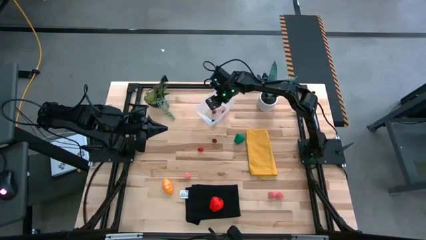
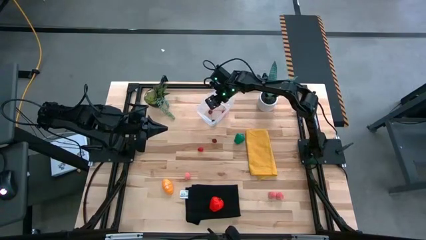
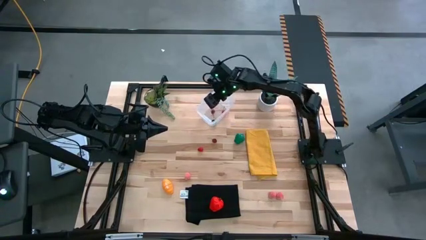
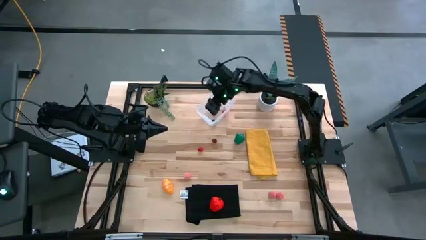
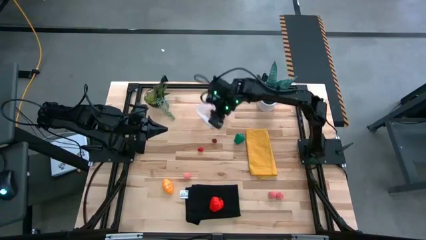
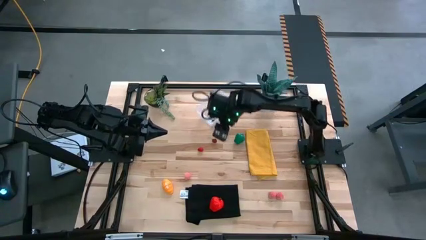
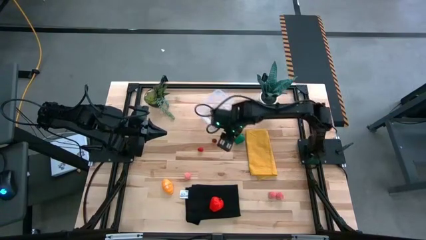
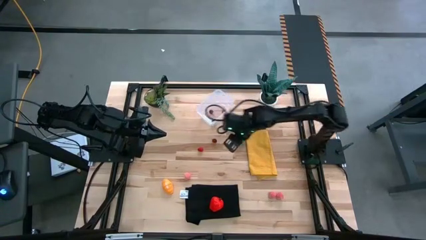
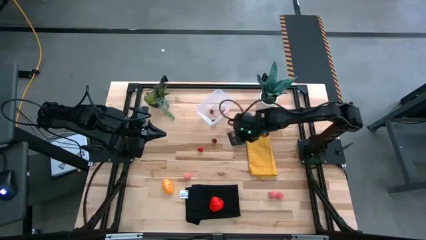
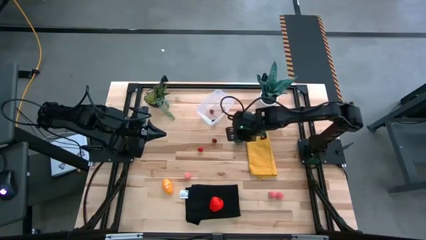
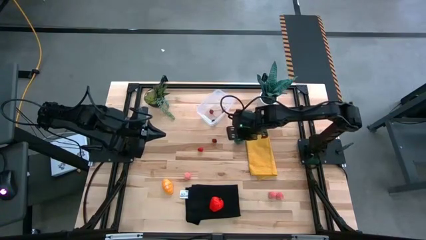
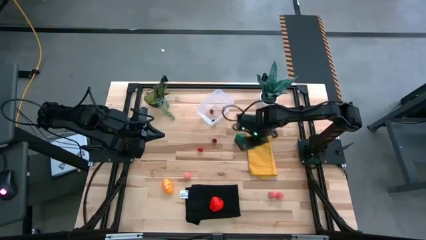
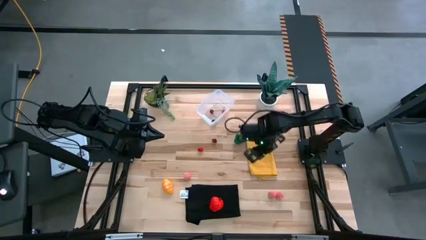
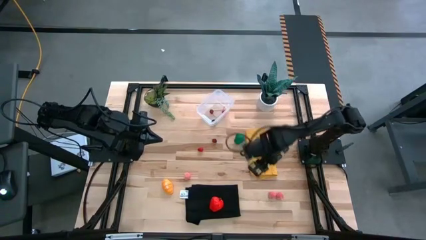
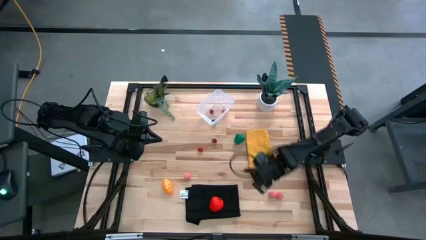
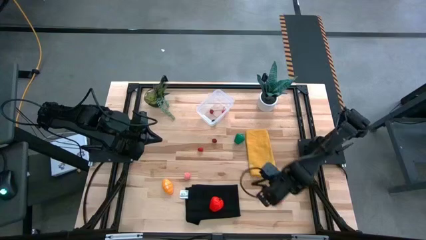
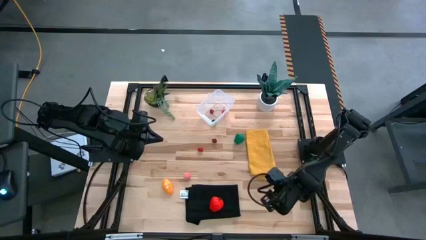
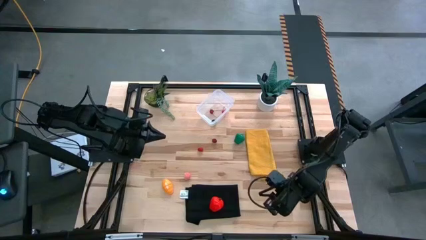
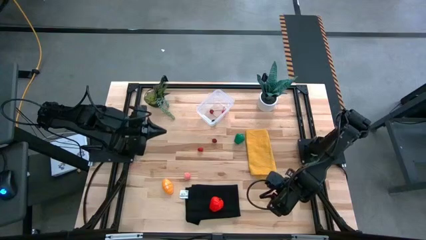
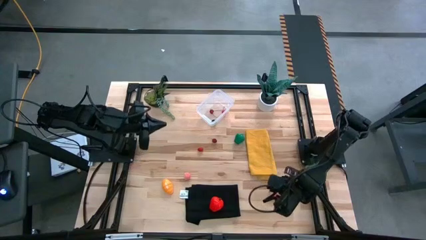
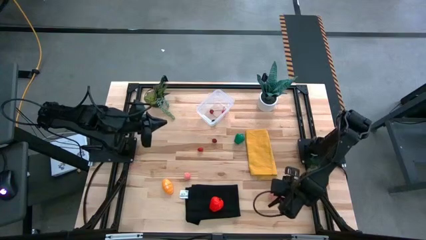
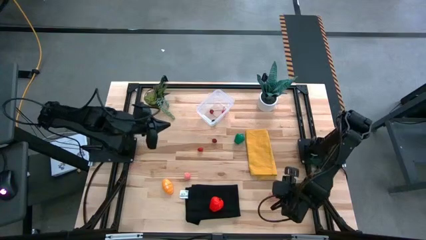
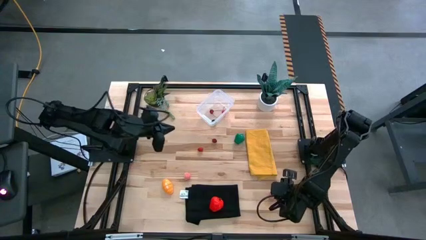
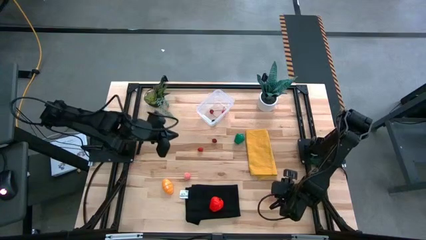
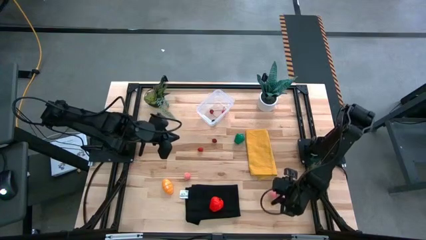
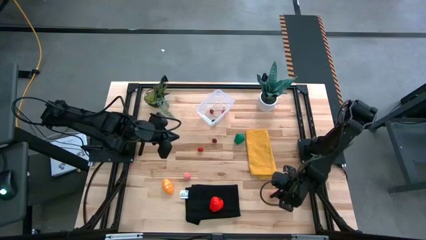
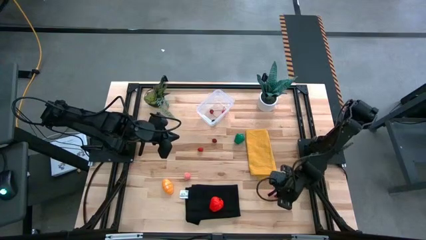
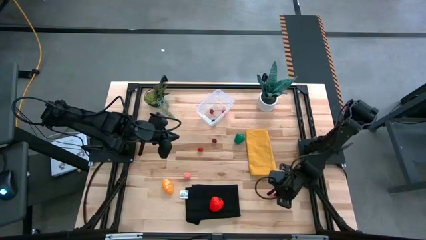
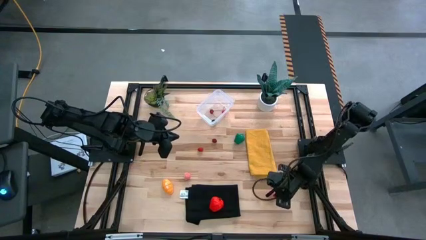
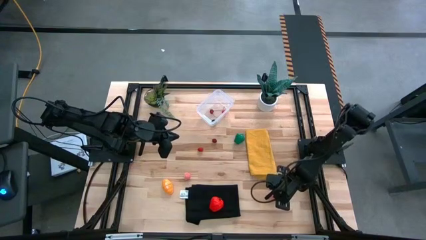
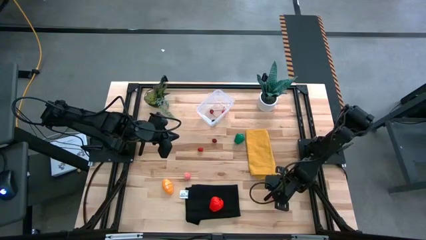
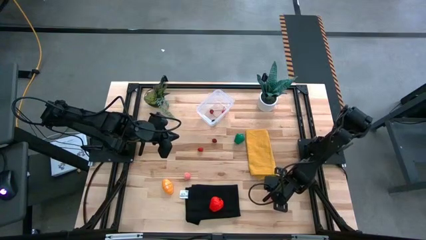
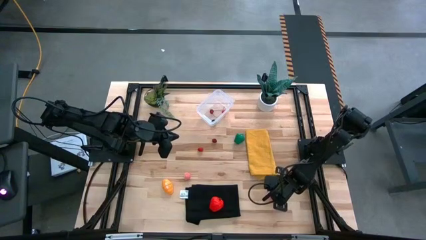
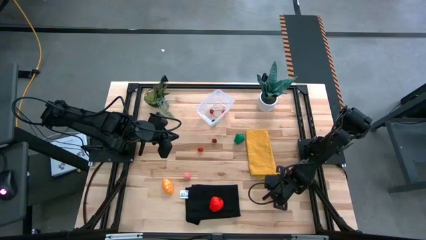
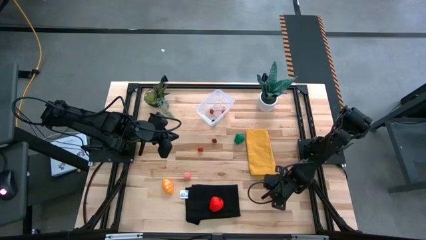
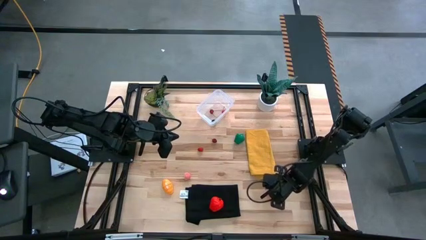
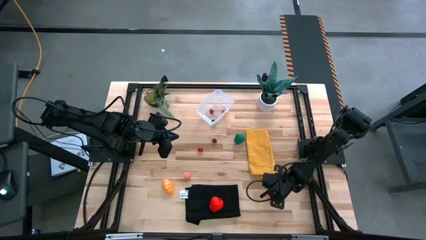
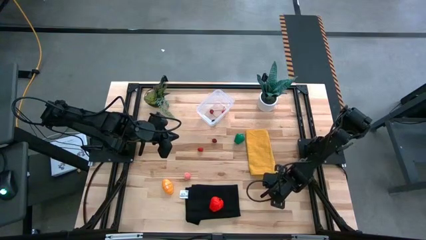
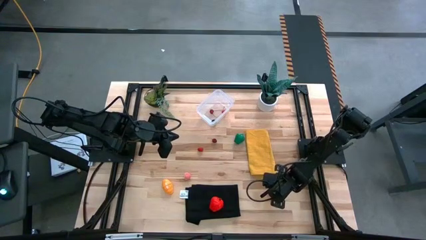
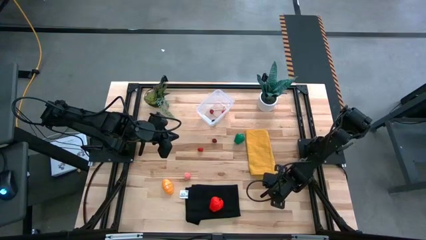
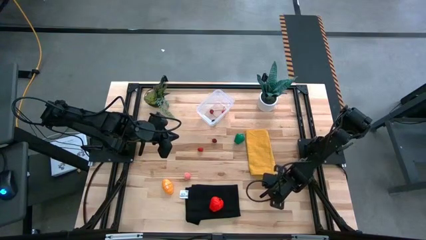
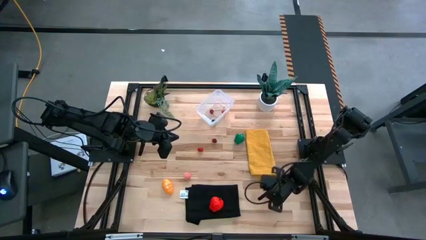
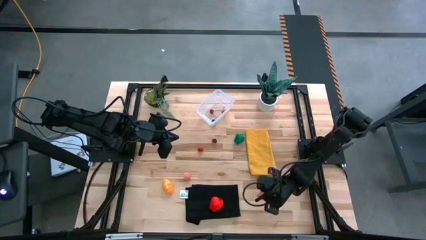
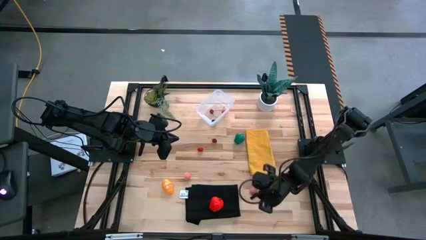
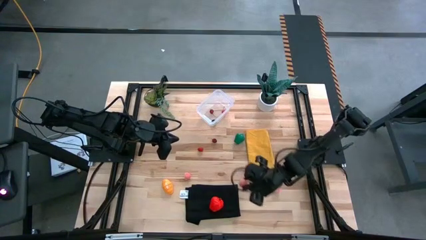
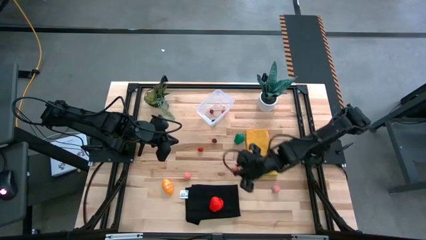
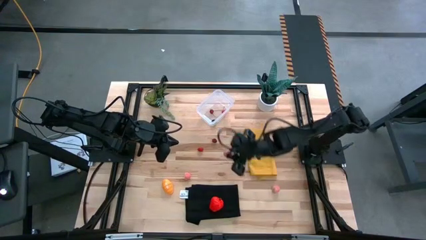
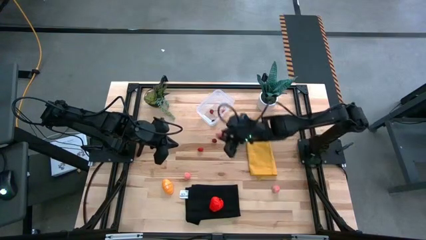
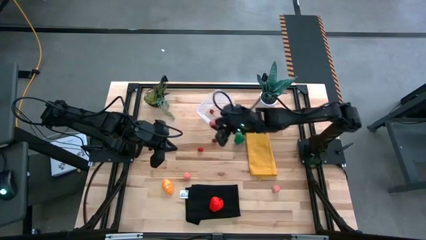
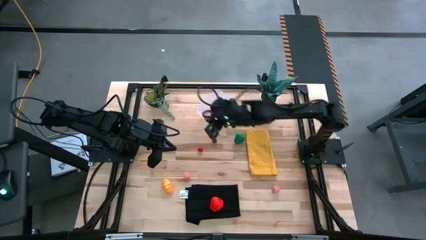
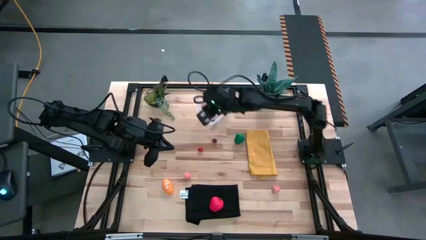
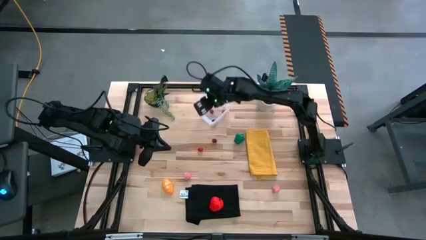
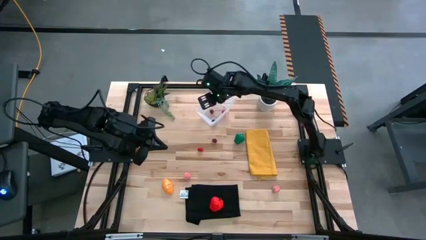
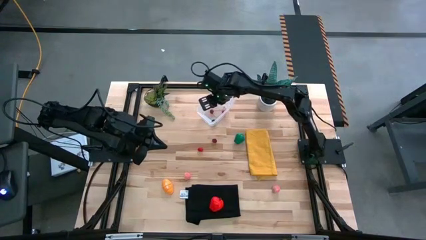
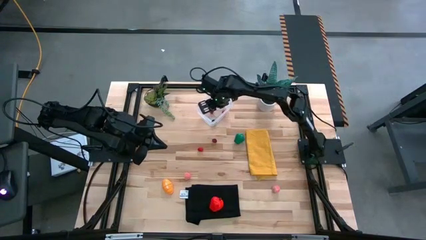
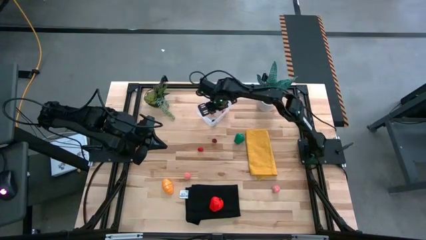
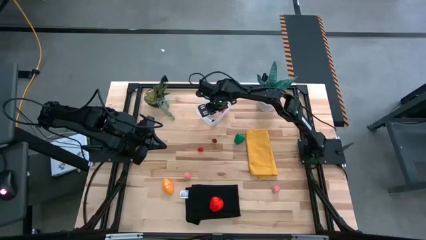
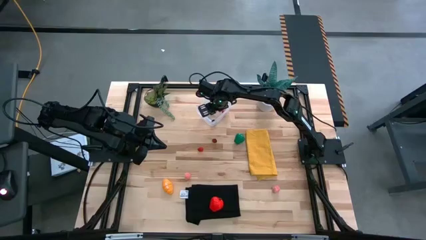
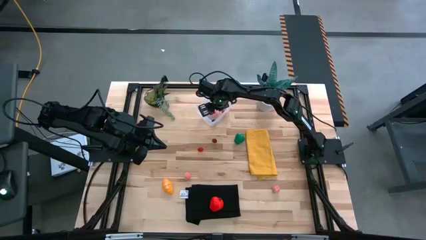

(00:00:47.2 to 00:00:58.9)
Task: Pick and placing Produce into tupperware
Put the middle pink peach into the transparent bin
